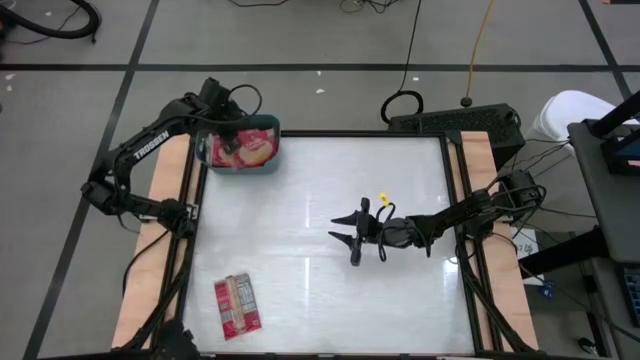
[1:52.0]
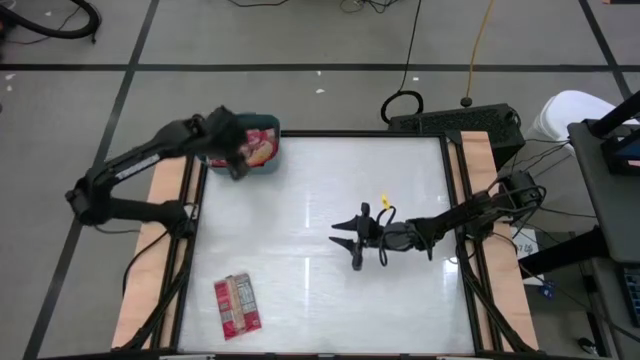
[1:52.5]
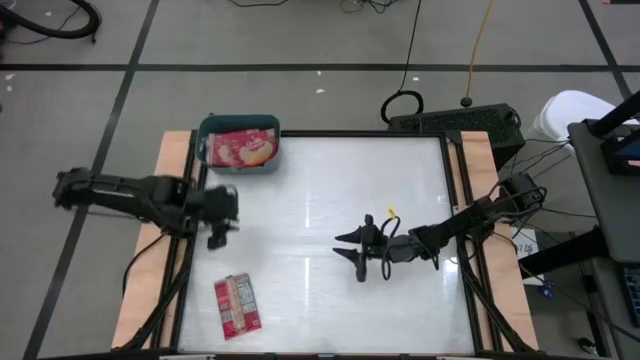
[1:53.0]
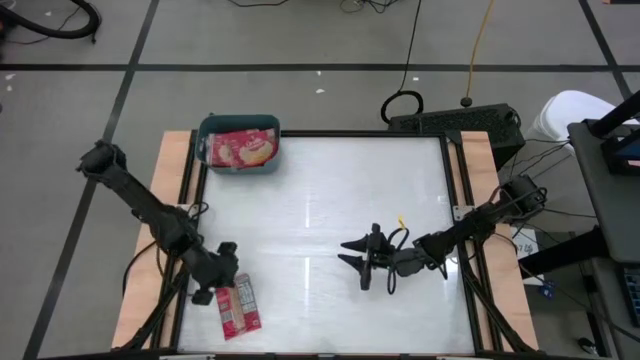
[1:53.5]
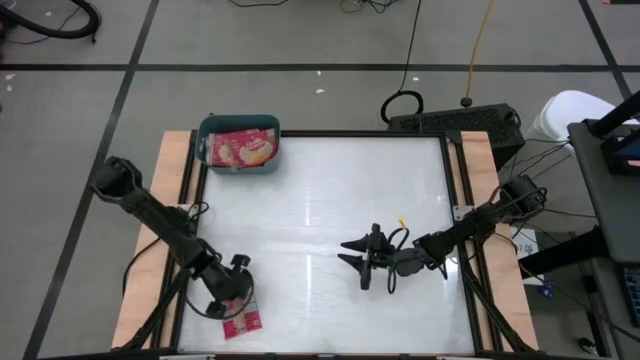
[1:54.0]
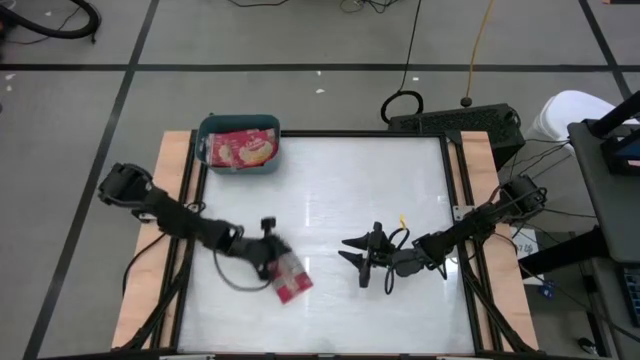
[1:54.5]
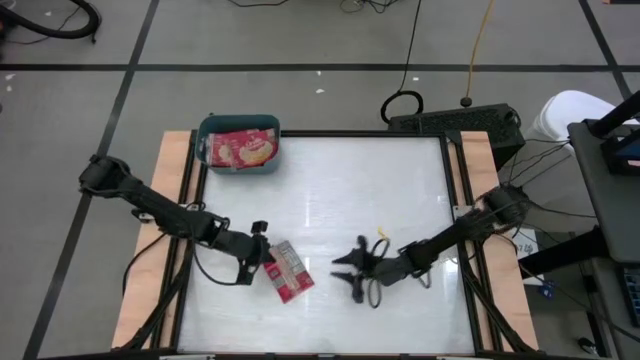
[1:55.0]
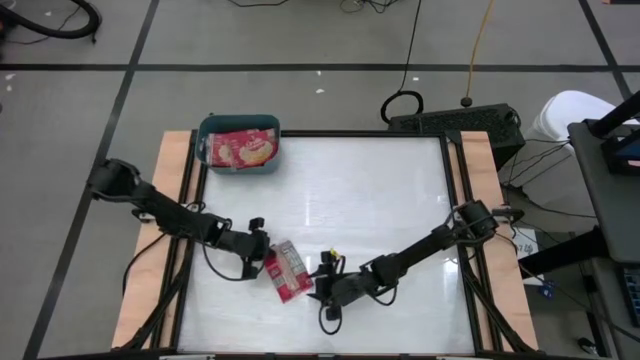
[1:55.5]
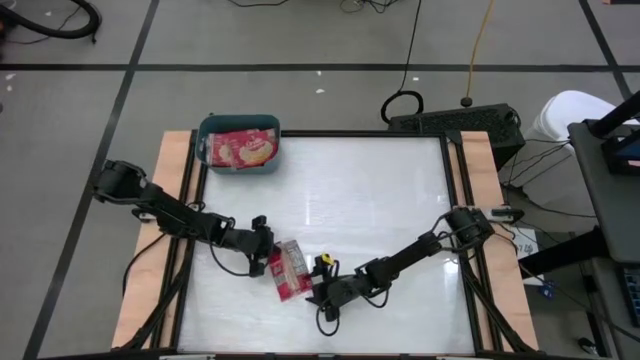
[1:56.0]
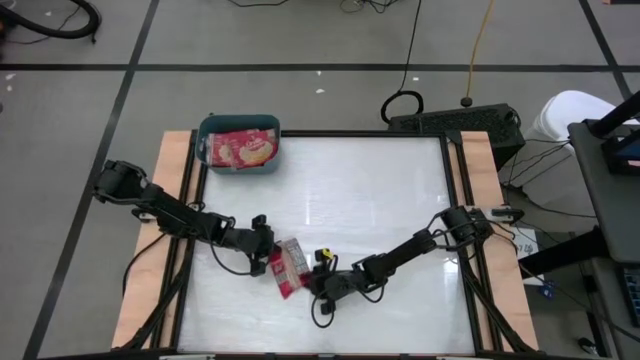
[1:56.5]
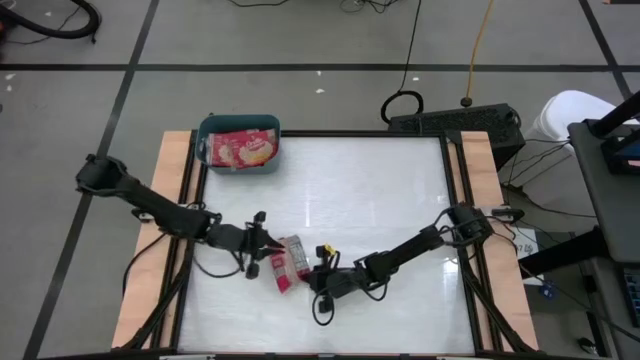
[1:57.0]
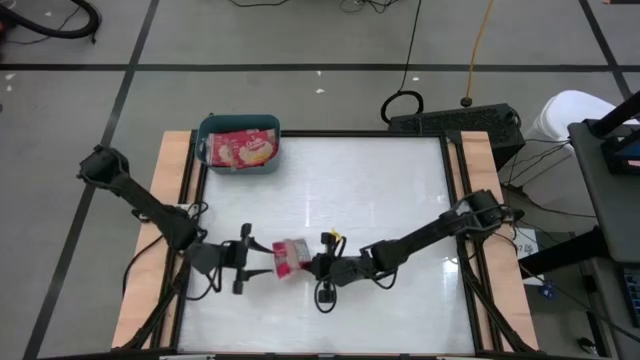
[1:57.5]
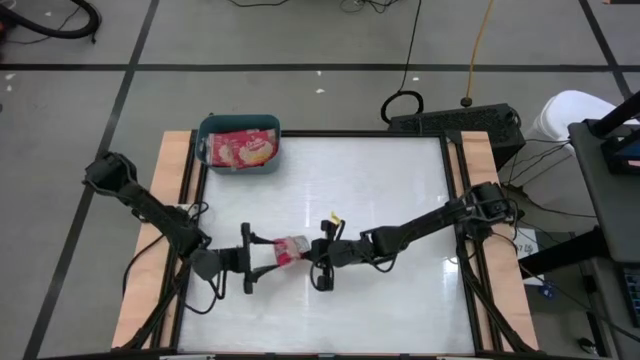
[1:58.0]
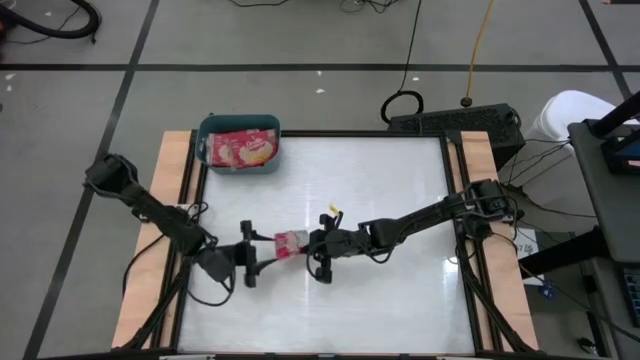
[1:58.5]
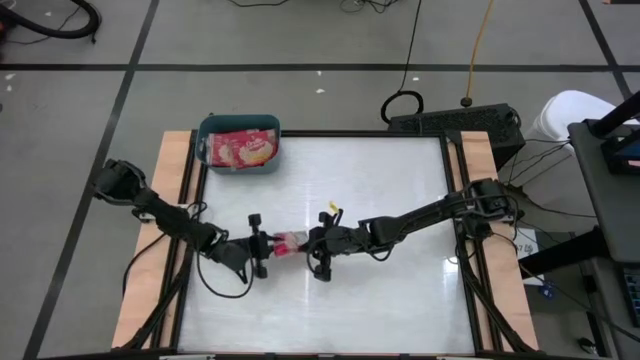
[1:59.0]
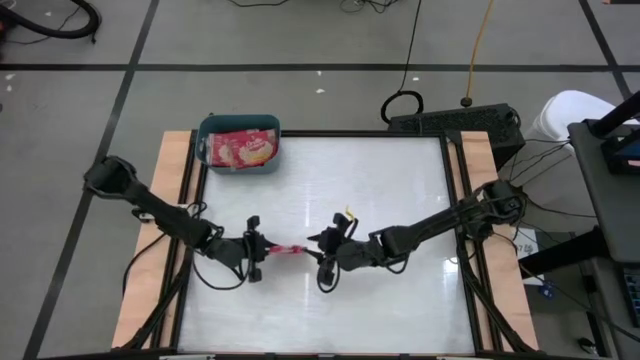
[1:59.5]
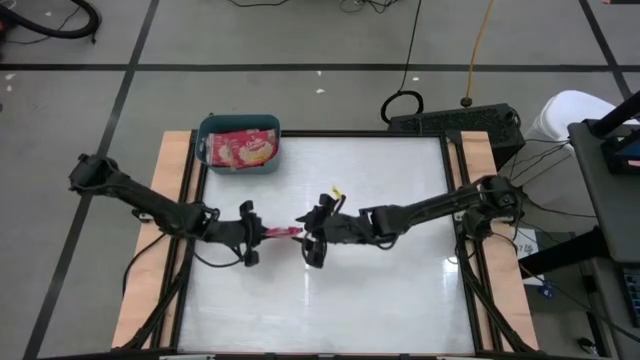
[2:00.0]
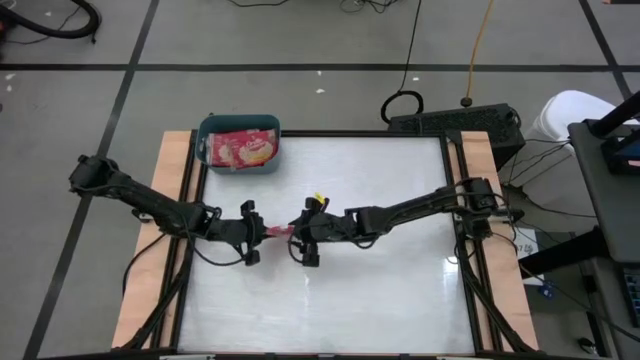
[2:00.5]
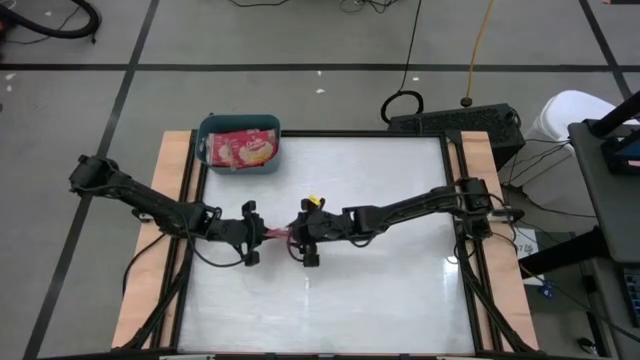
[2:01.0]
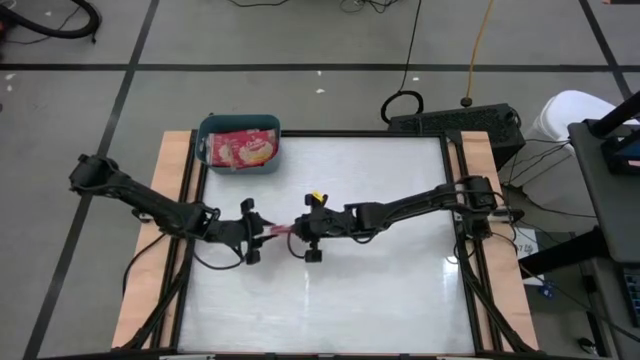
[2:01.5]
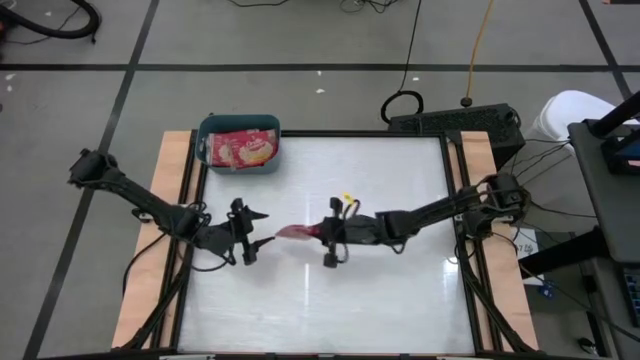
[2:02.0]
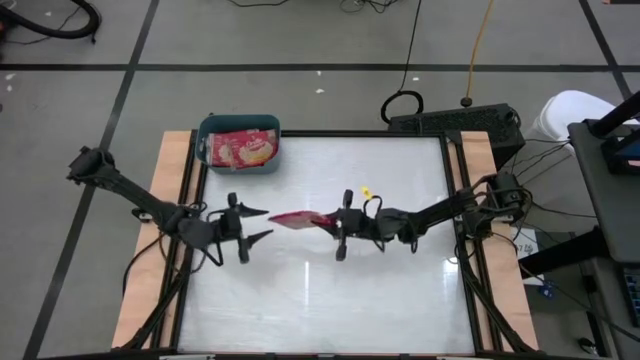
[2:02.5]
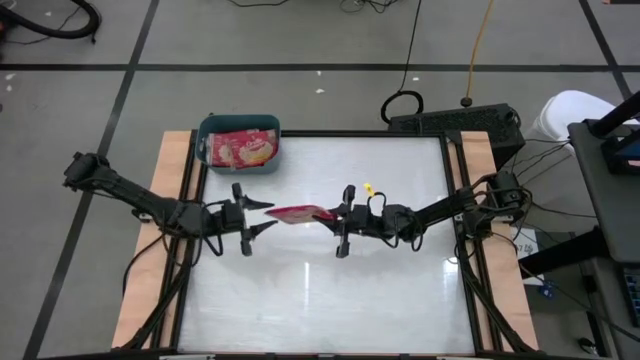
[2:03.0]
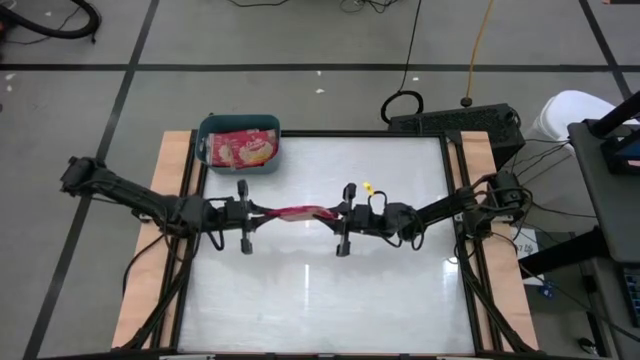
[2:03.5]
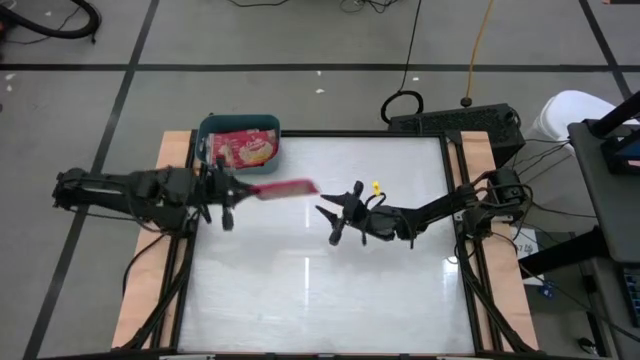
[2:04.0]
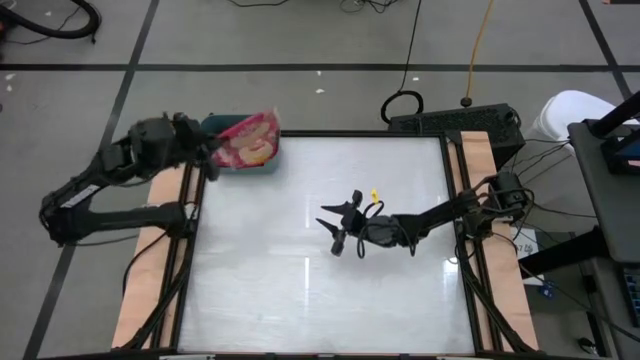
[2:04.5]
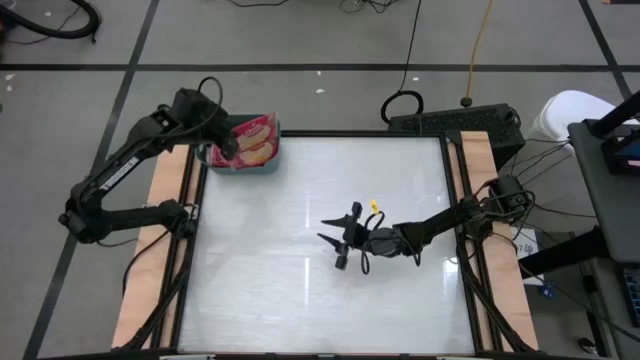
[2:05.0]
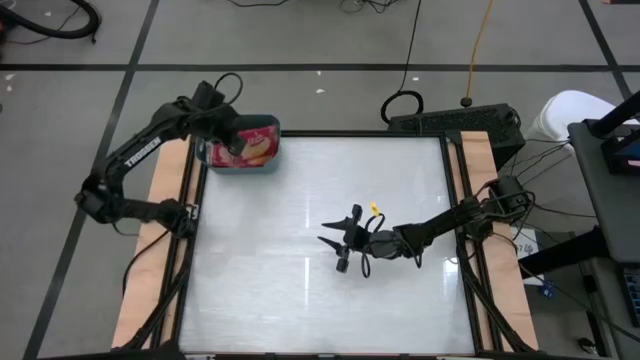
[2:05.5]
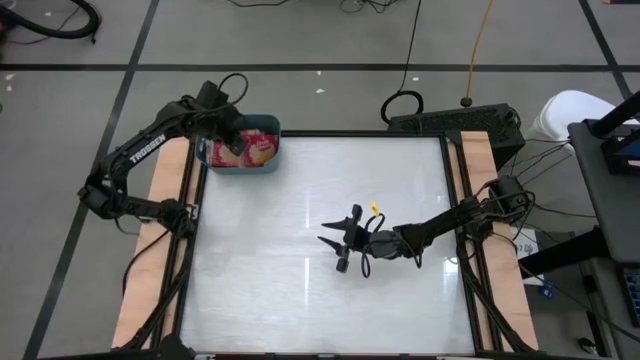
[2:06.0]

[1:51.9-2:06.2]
Task: Sort popcorn bags into baskets
Put the red popcorn bag into the blue bin

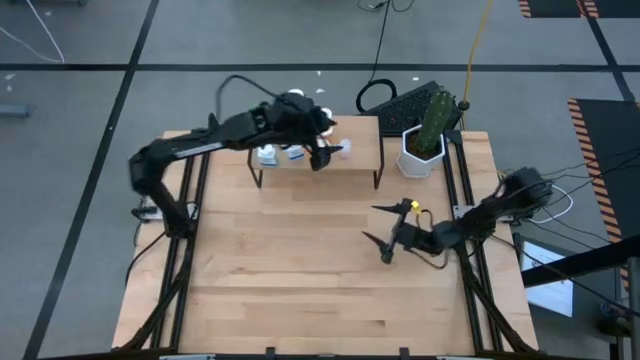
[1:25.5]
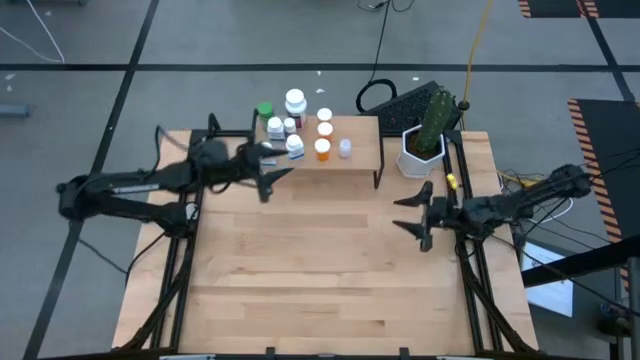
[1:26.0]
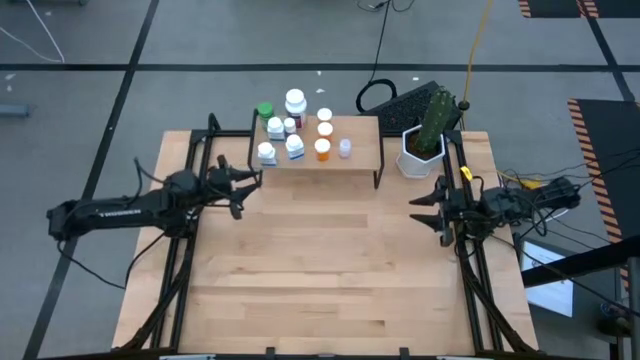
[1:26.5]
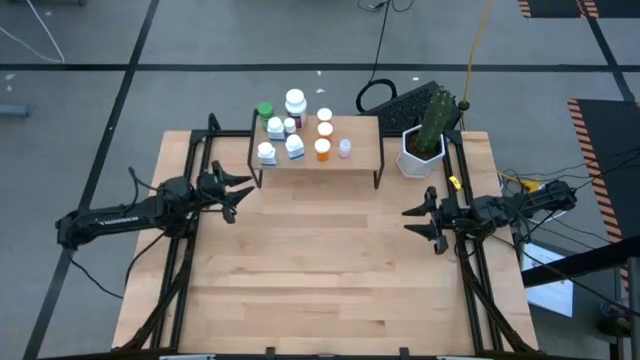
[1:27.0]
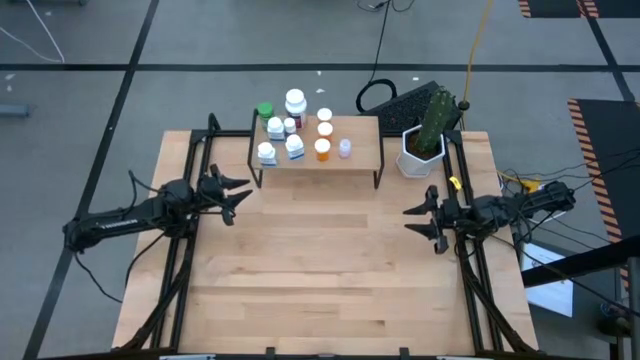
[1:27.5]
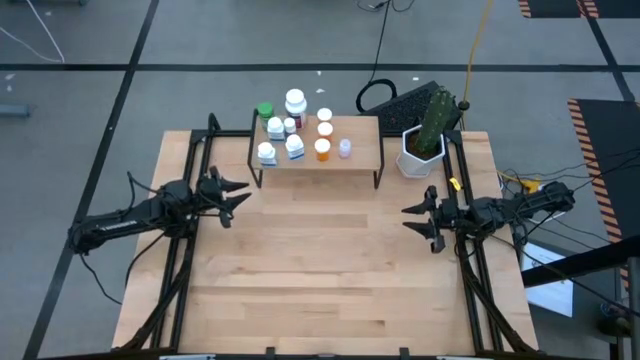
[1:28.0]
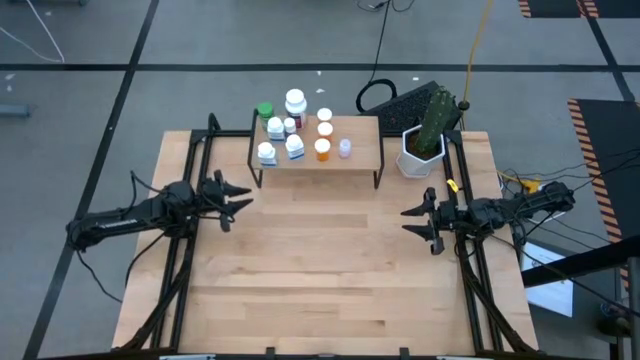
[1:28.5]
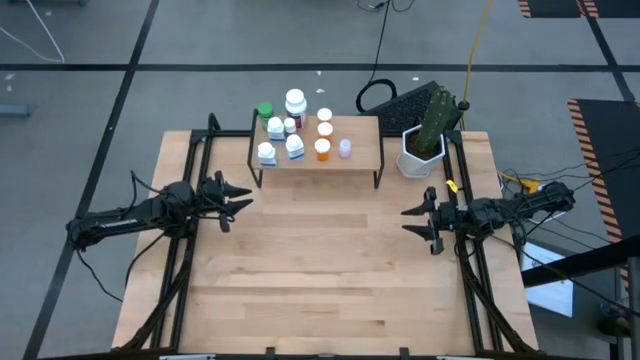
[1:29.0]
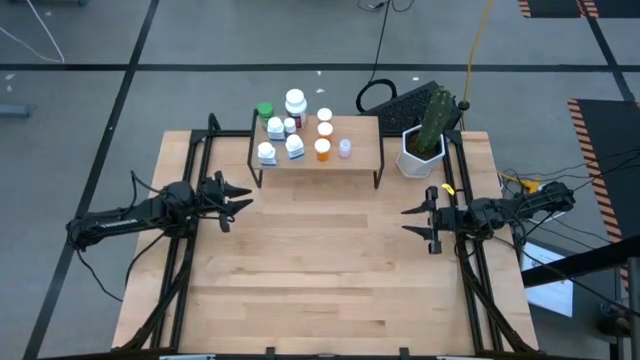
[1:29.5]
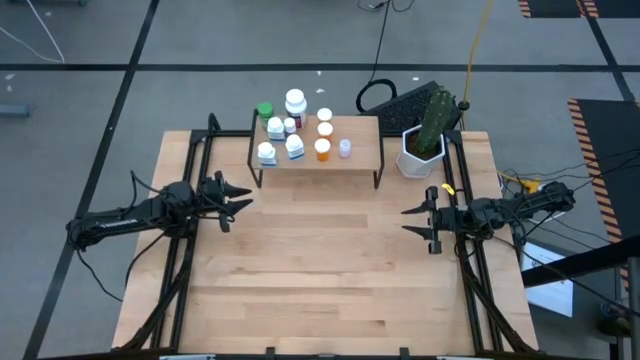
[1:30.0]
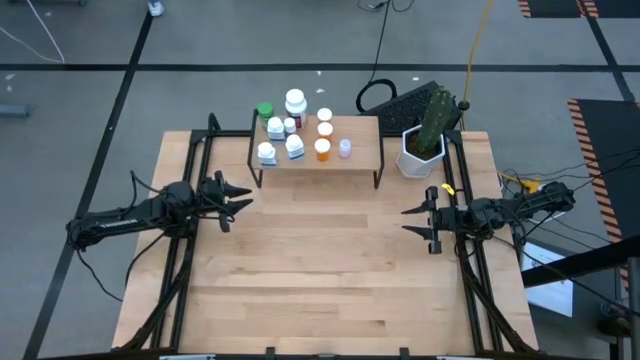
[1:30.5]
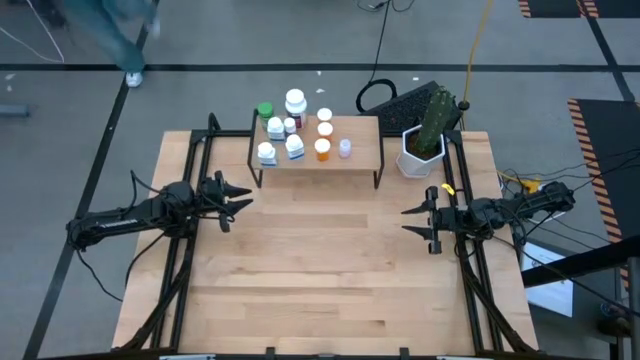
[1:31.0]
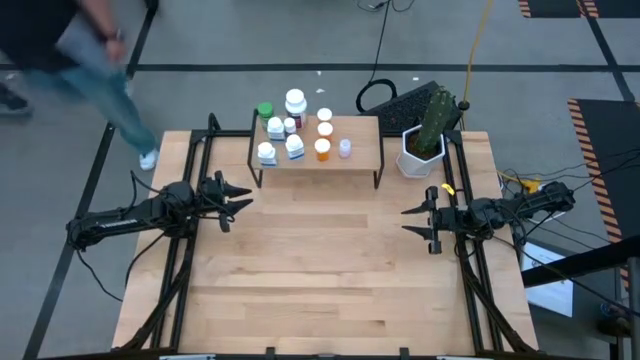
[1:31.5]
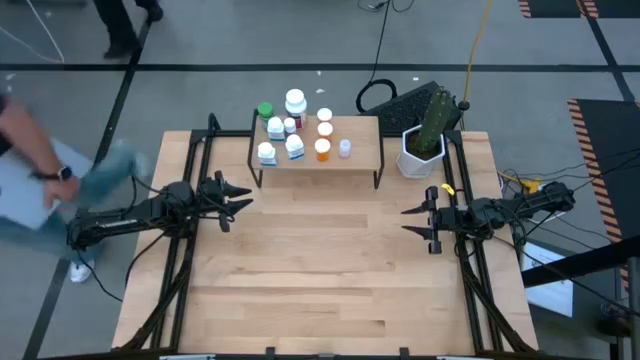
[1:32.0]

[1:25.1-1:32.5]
Task: Pick and place medicine bottles onto shelf by color
Return to Home Position
